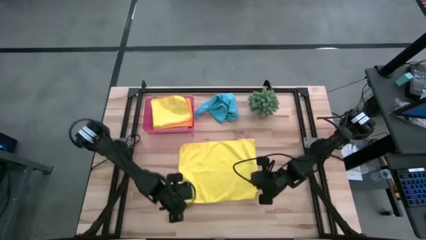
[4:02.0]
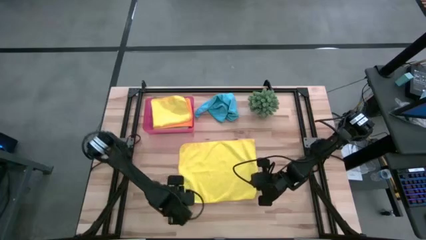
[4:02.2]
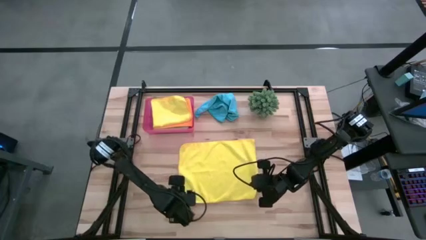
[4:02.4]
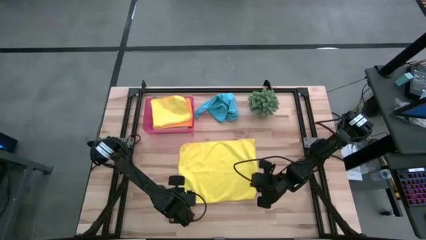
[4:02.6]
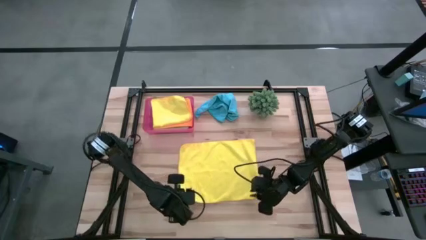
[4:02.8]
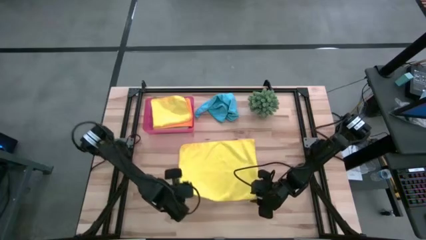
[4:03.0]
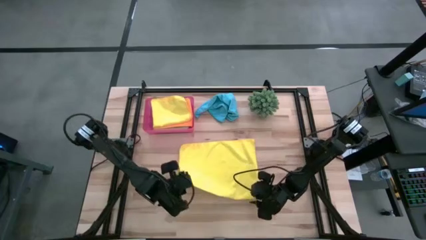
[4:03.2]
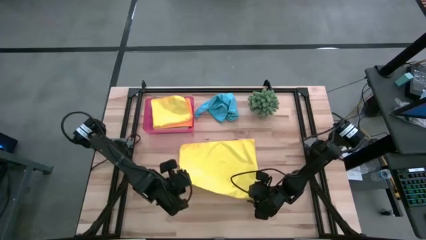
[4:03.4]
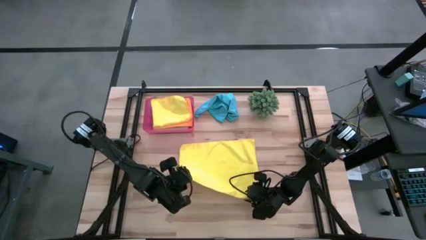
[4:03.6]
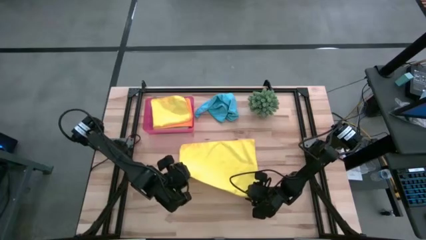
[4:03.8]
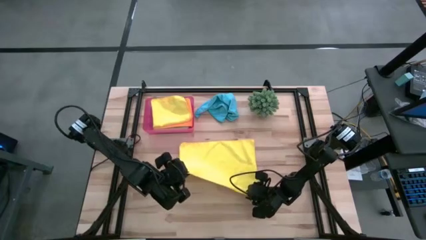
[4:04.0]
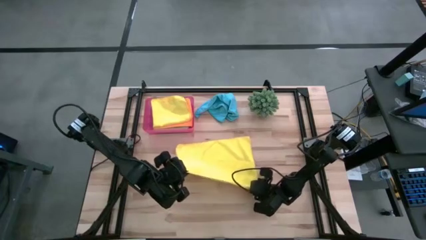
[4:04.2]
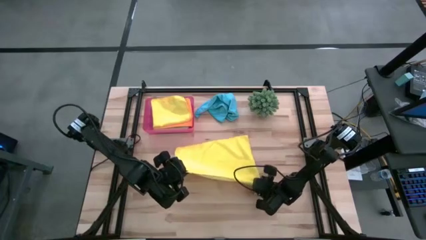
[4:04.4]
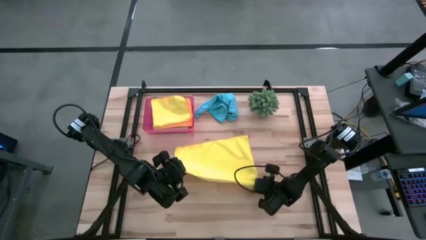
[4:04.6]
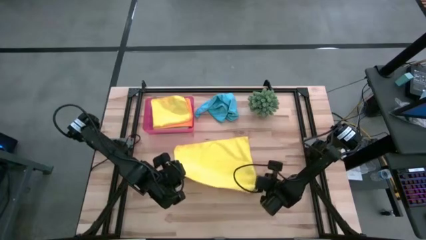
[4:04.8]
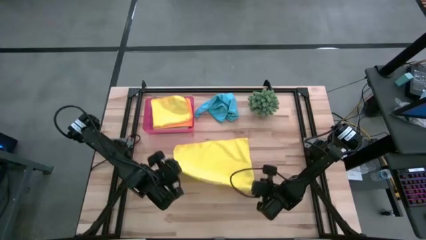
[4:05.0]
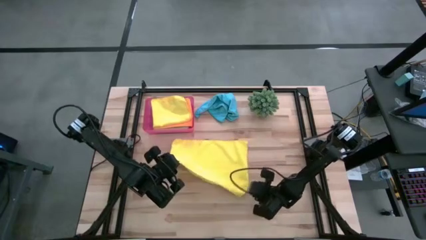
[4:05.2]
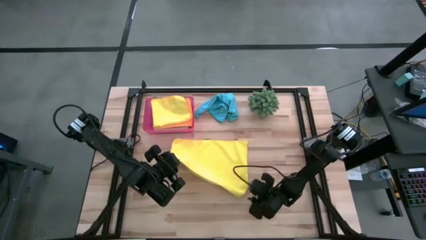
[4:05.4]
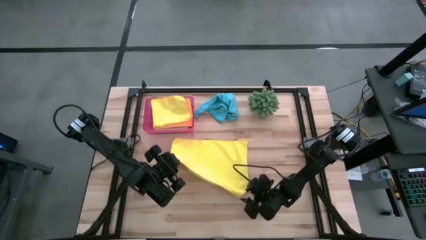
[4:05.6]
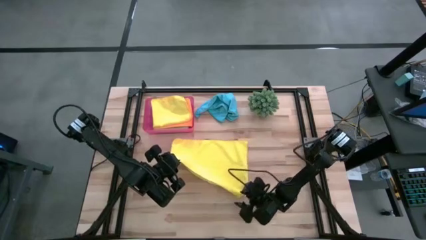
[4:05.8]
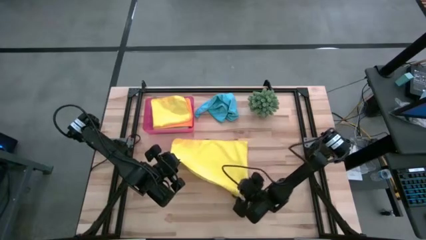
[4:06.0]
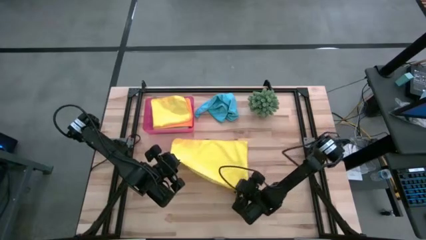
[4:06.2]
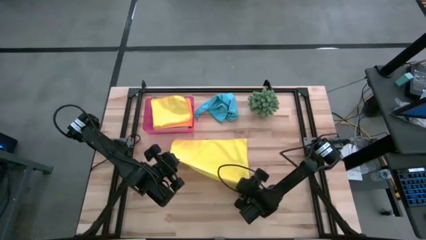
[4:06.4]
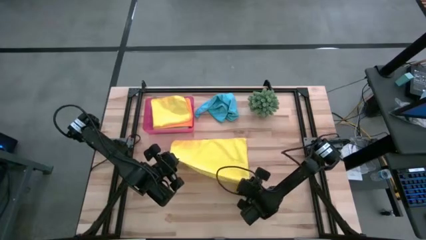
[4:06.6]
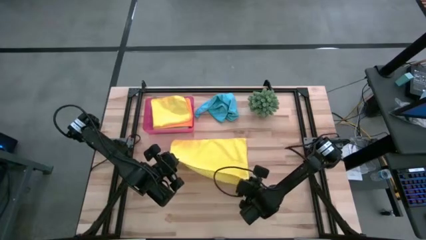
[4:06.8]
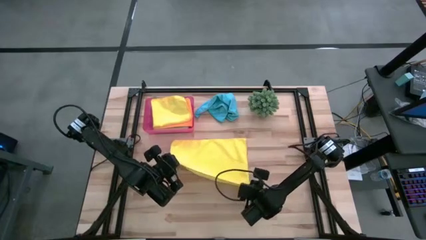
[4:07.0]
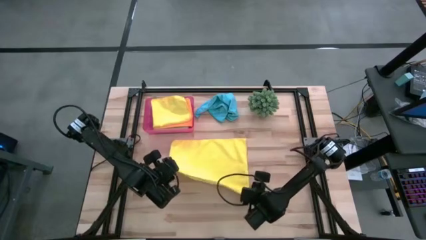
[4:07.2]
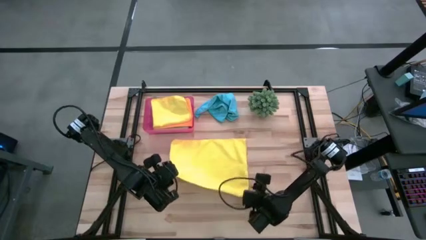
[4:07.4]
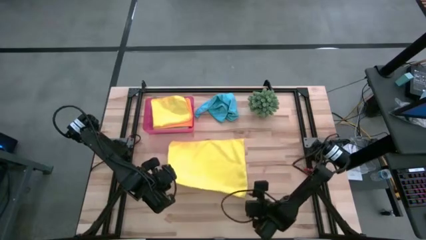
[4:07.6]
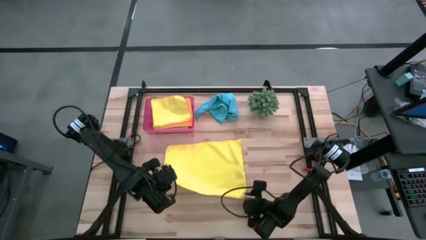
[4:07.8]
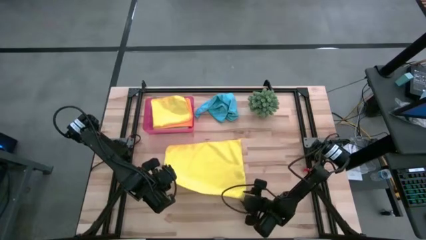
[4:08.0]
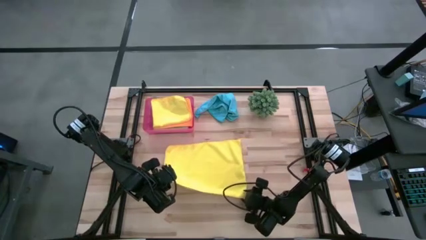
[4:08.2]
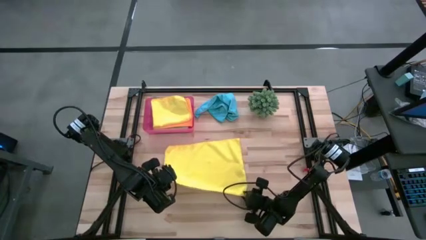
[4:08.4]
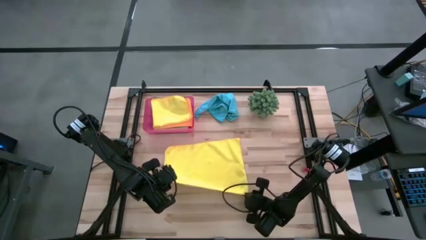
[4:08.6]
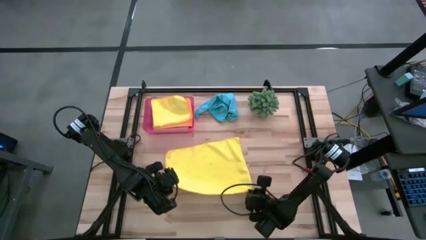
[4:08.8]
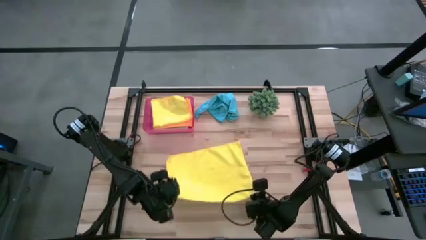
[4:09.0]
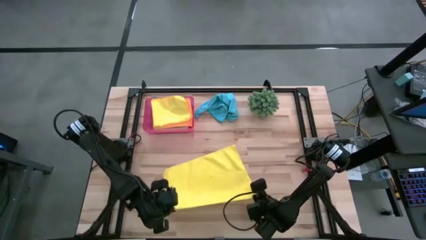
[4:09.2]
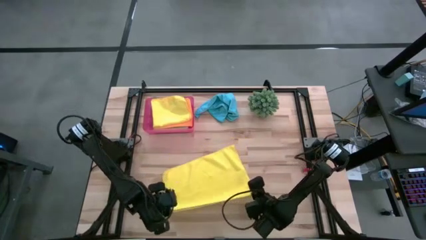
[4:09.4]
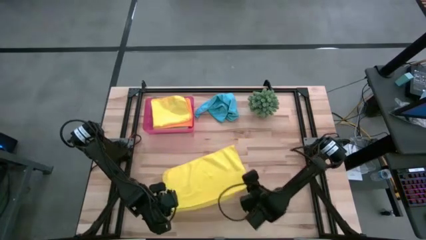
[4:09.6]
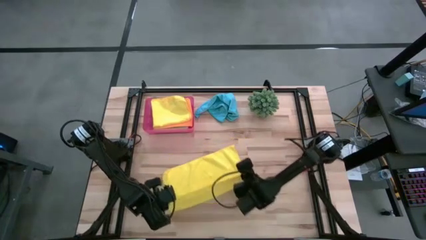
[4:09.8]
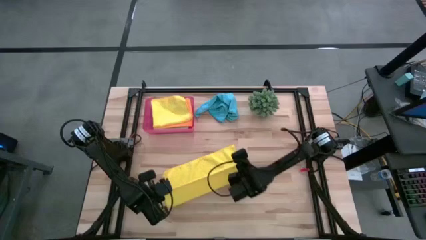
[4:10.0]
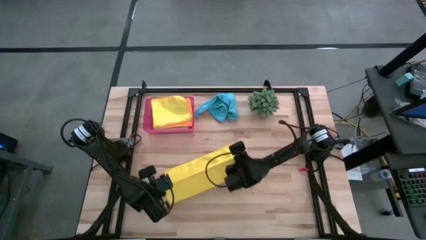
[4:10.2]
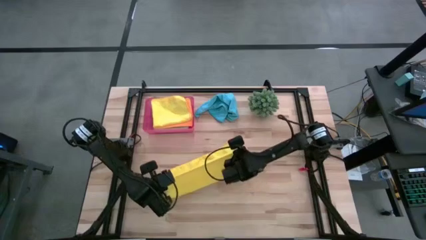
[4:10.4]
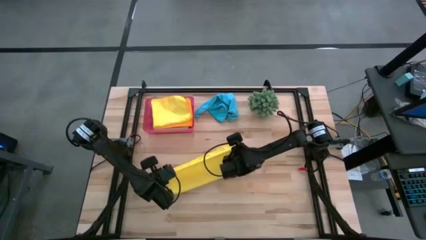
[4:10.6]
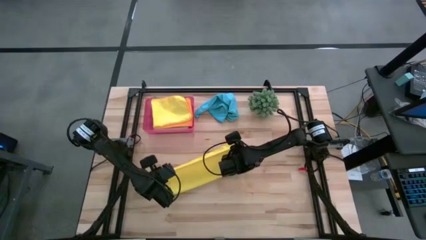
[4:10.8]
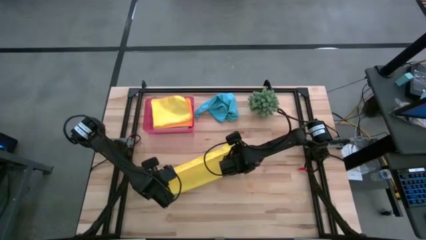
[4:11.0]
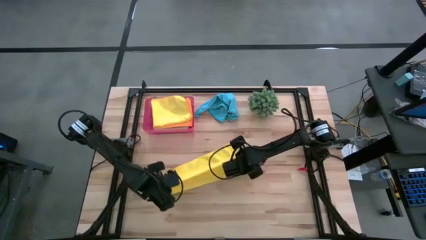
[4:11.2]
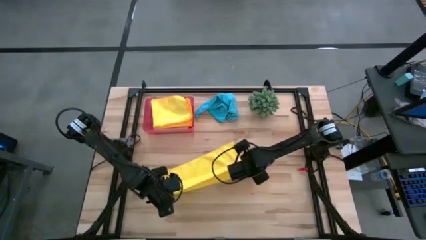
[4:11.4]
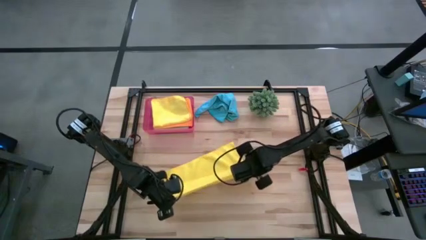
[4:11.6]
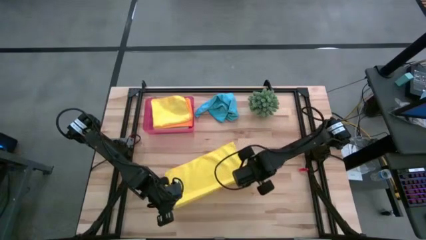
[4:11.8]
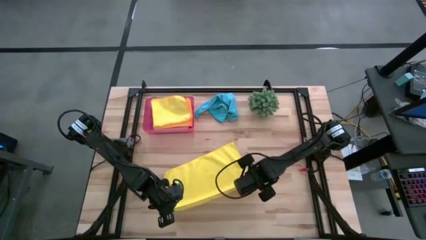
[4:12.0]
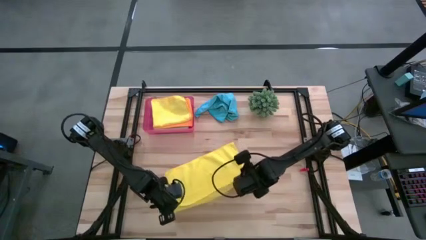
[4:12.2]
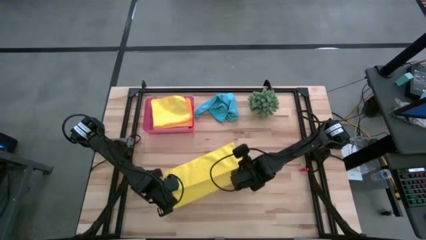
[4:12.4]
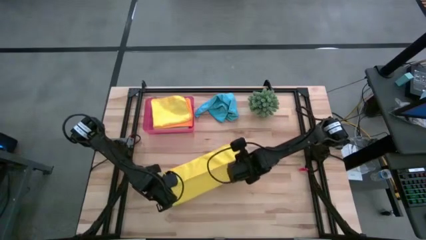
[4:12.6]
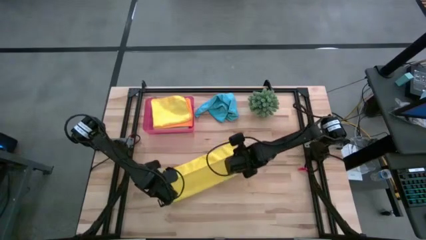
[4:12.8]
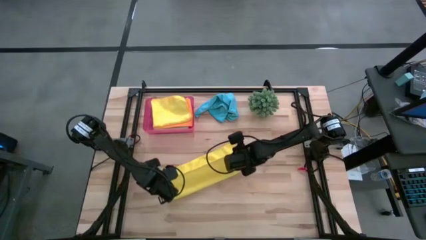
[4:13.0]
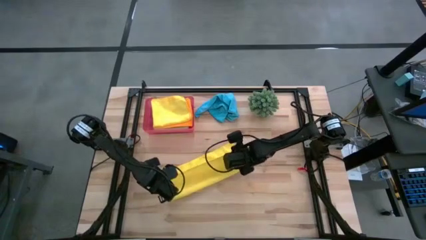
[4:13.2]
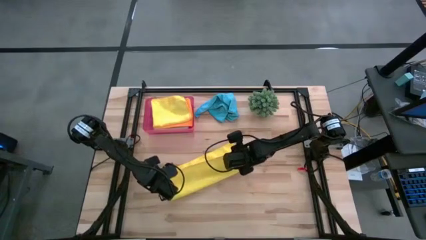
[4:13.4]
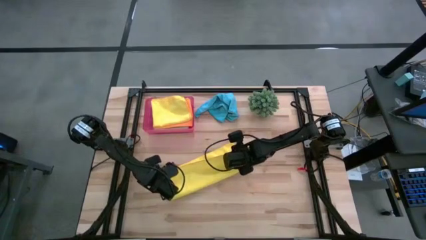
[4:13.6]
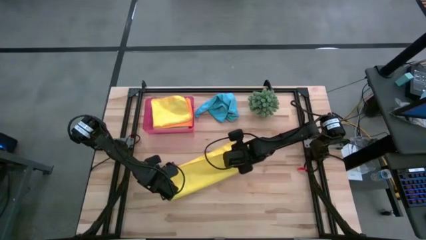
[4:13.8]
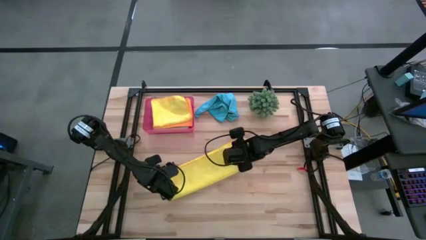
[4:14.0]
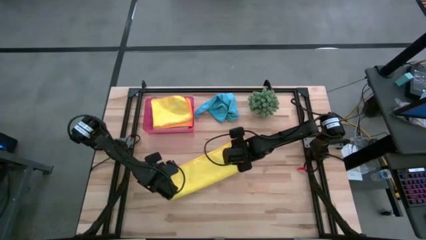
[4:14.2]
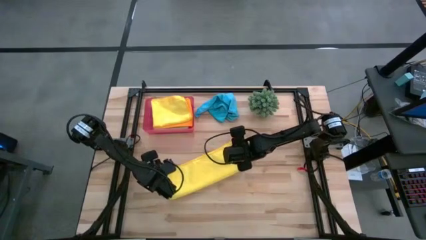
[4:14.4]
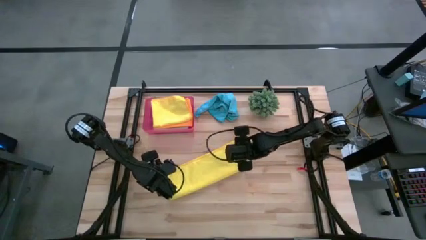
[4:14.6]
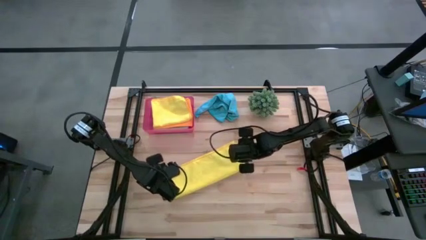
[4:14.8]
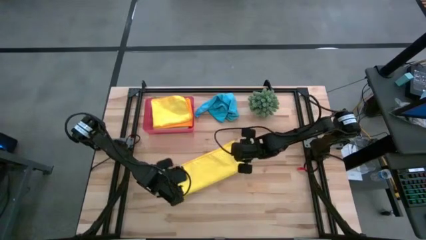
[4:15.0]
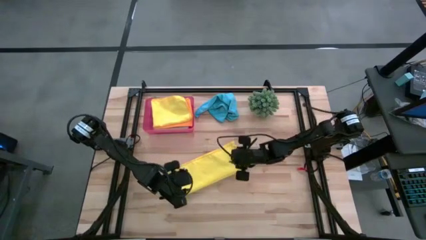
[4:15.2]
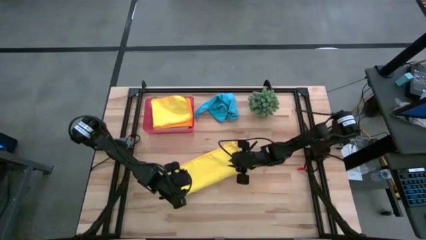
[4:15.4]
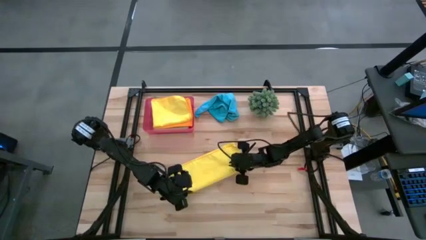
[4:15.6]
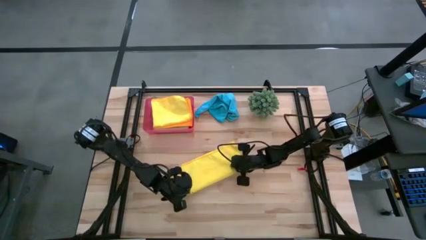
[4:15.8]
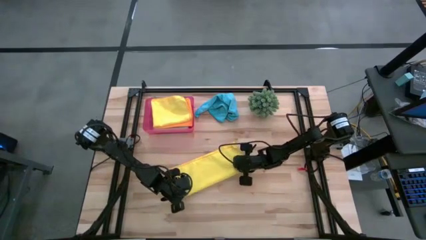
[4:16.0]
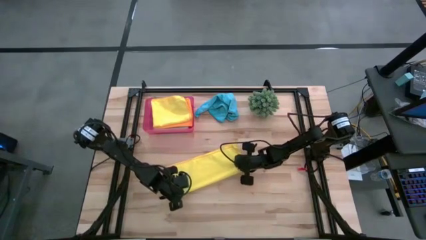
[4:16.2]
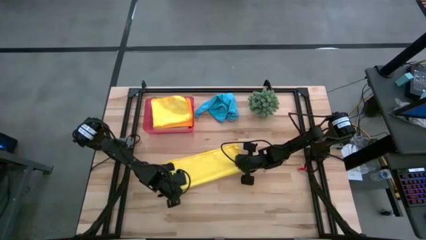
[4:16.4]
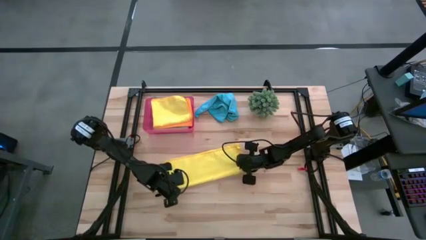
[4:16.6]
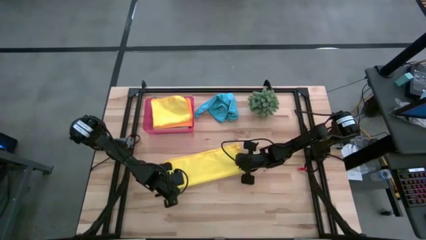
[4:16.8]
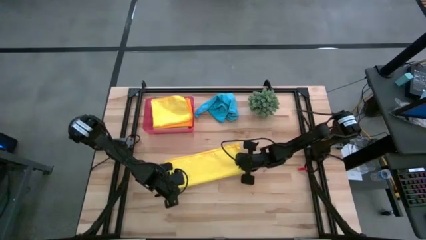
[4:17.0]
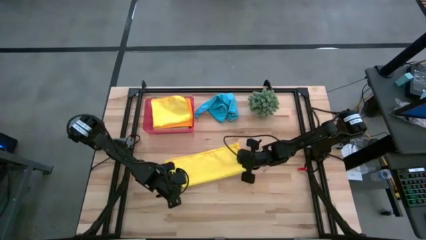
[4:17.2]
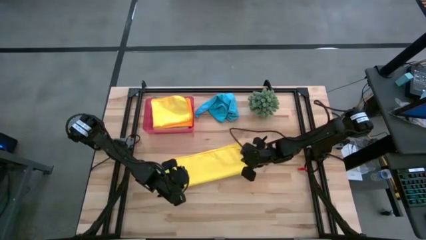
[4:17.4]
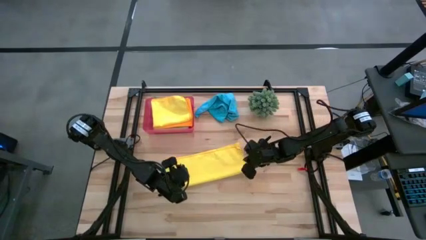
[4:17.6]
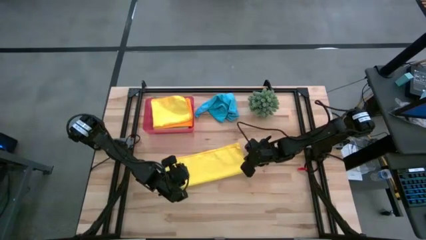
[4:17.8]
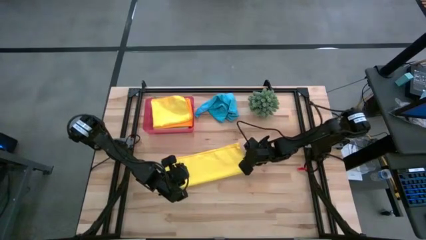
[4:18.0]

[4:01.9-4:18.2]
Task: Fold microfiber towels
Fold the yellow towel
